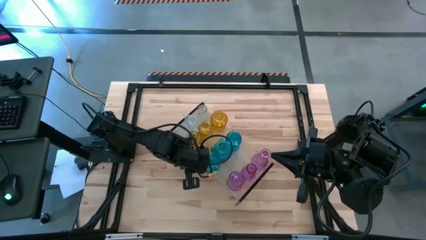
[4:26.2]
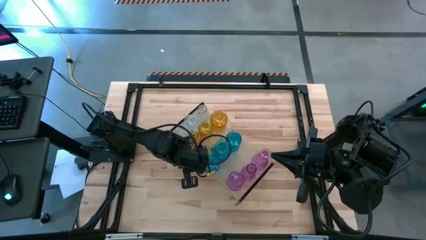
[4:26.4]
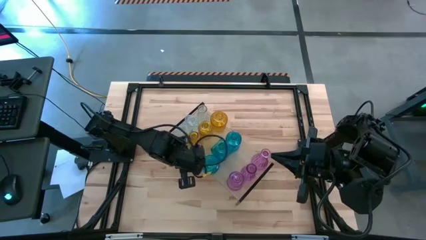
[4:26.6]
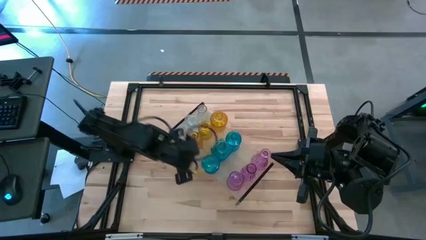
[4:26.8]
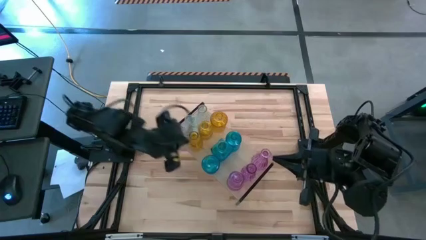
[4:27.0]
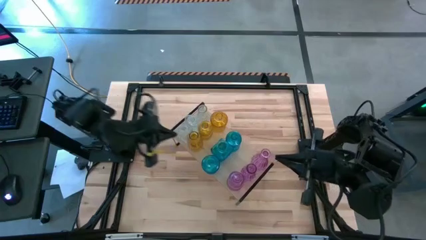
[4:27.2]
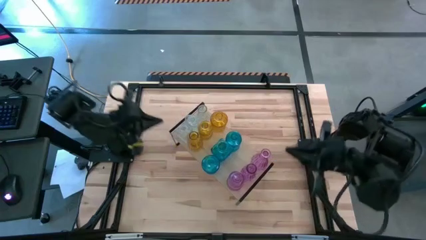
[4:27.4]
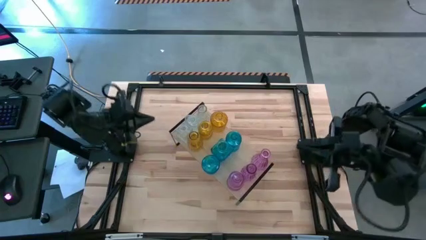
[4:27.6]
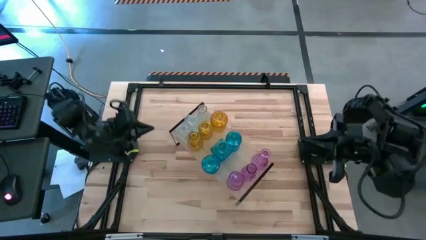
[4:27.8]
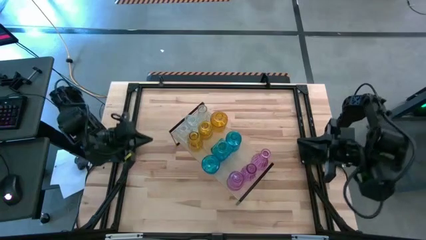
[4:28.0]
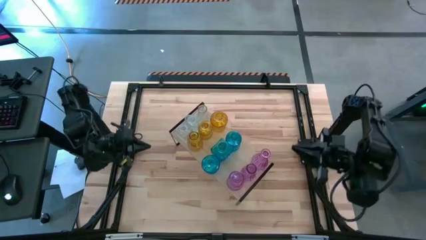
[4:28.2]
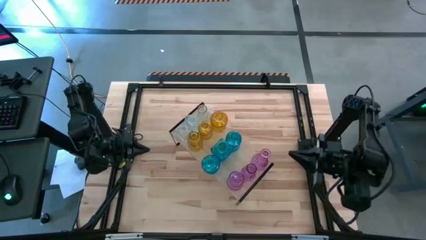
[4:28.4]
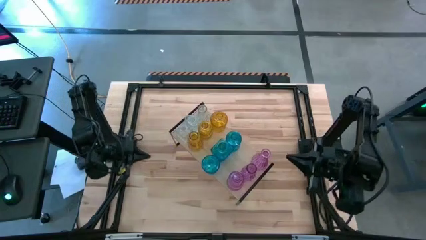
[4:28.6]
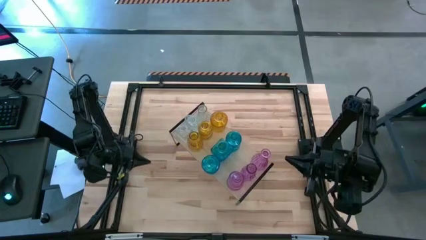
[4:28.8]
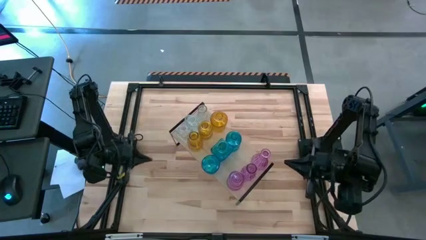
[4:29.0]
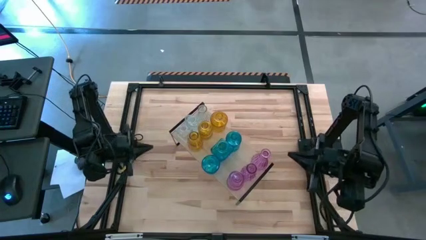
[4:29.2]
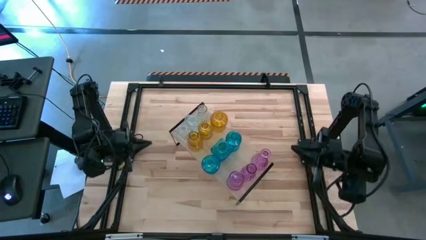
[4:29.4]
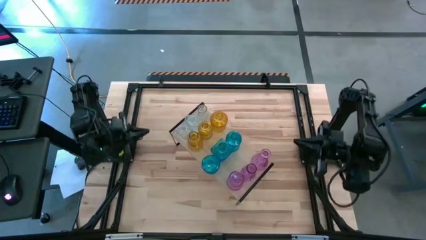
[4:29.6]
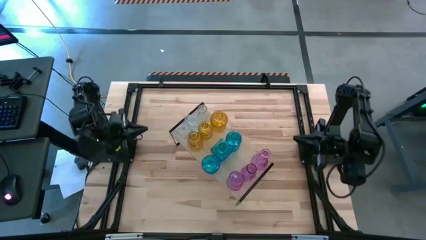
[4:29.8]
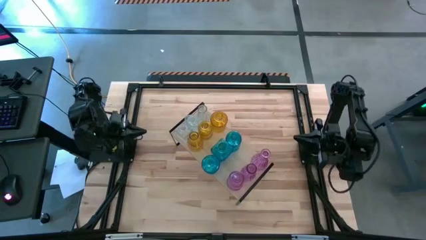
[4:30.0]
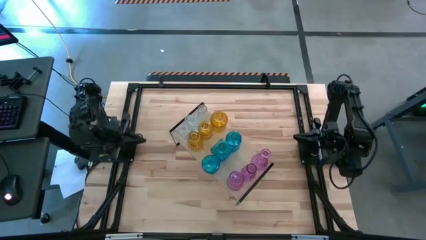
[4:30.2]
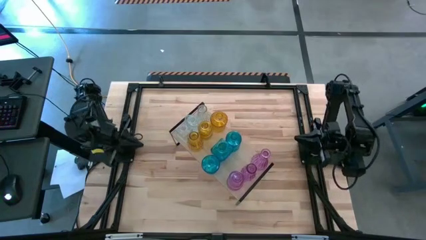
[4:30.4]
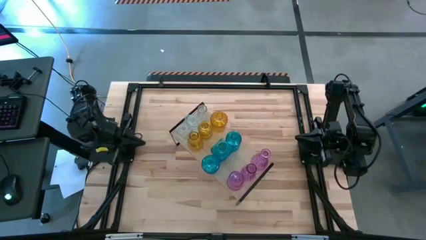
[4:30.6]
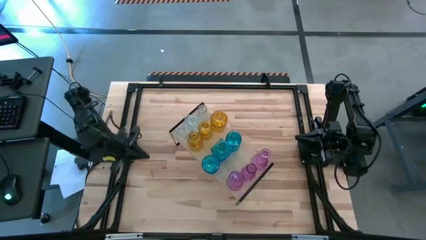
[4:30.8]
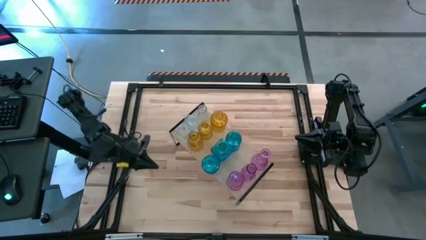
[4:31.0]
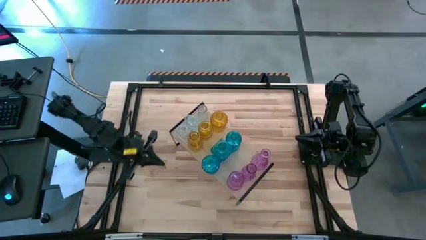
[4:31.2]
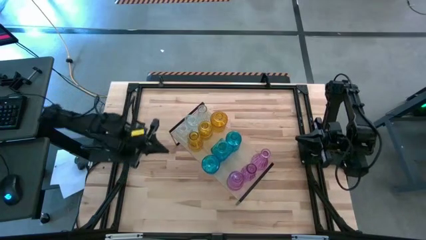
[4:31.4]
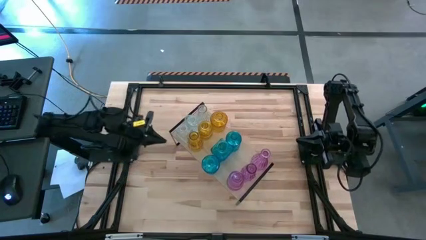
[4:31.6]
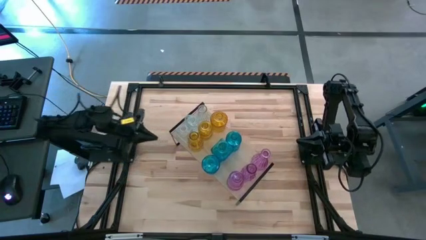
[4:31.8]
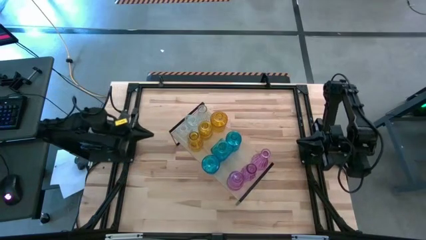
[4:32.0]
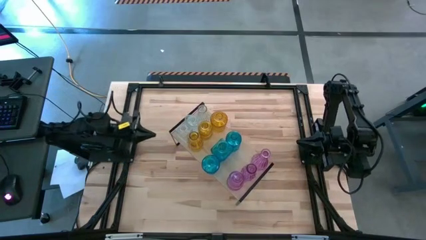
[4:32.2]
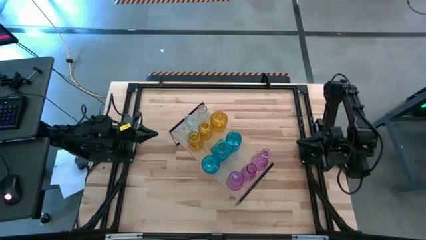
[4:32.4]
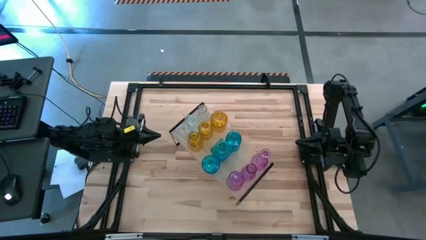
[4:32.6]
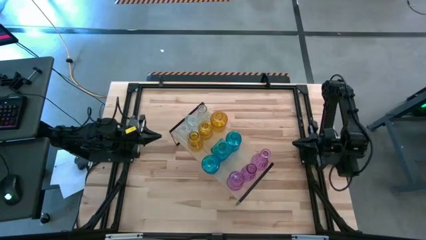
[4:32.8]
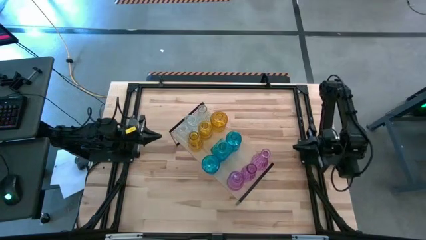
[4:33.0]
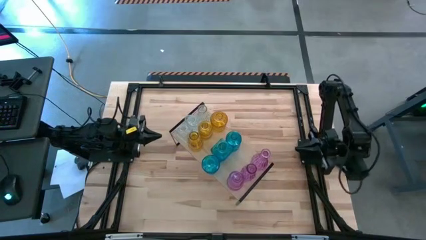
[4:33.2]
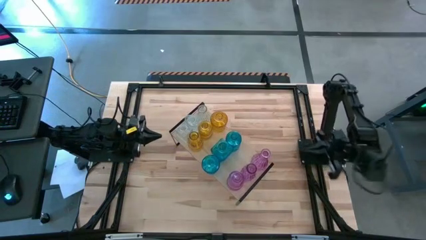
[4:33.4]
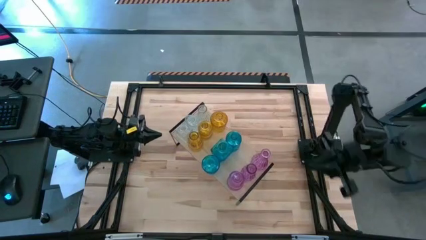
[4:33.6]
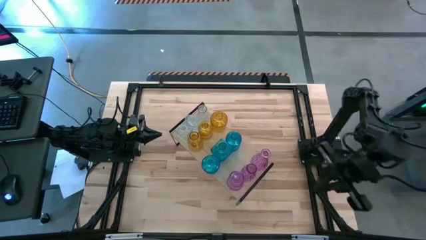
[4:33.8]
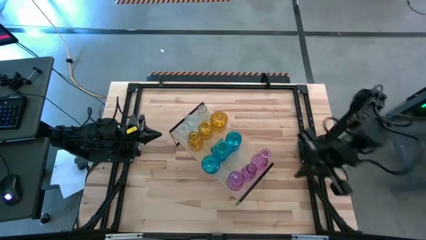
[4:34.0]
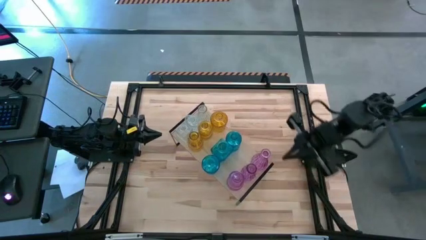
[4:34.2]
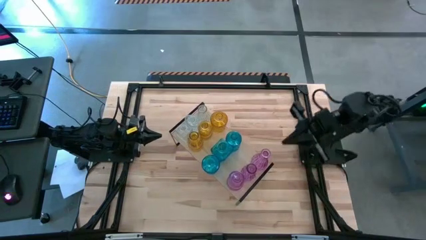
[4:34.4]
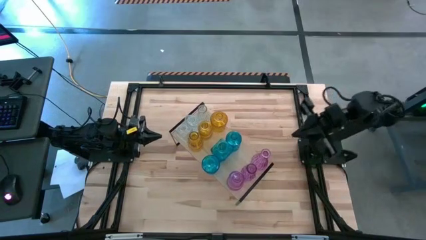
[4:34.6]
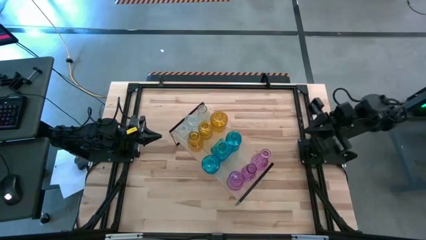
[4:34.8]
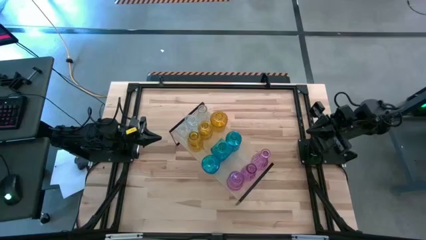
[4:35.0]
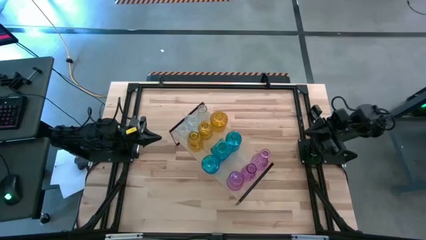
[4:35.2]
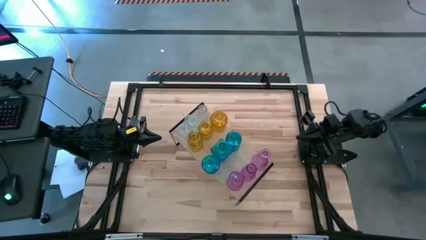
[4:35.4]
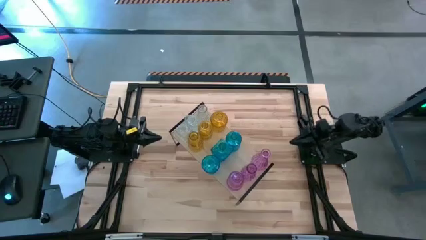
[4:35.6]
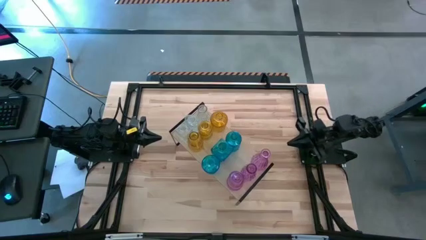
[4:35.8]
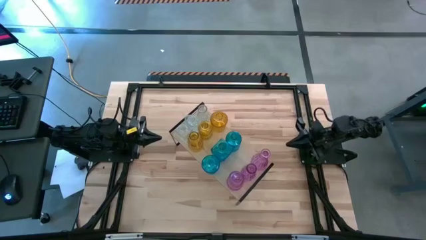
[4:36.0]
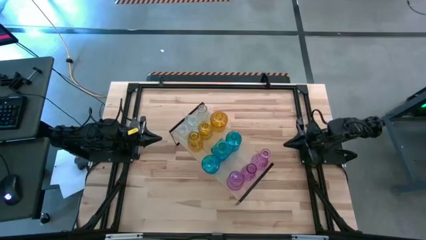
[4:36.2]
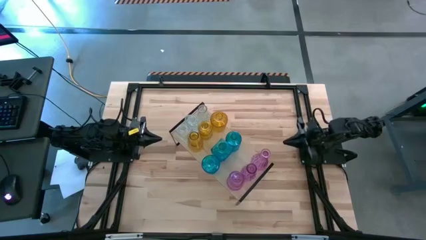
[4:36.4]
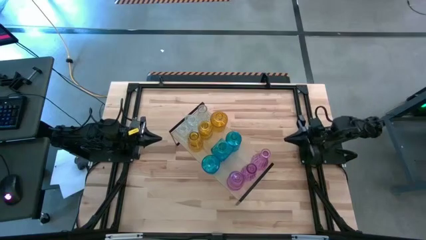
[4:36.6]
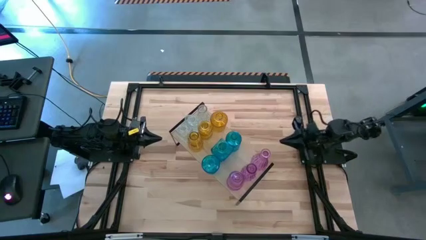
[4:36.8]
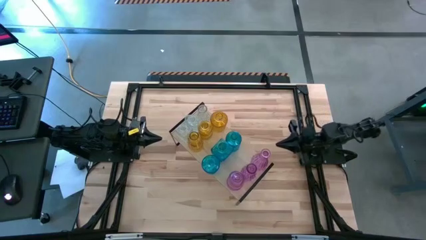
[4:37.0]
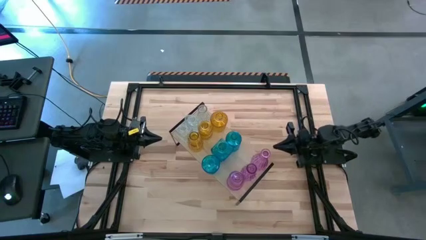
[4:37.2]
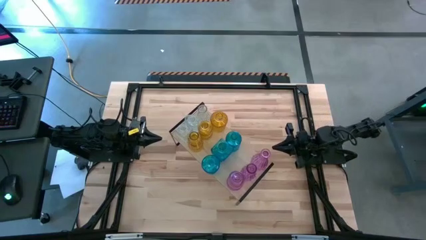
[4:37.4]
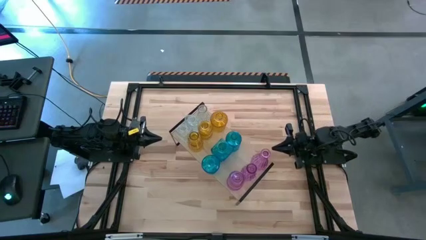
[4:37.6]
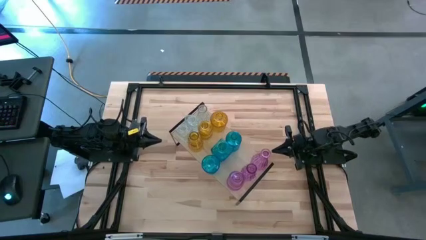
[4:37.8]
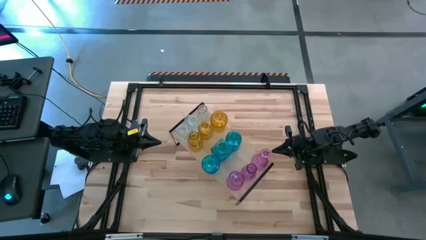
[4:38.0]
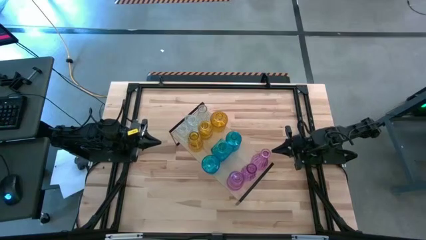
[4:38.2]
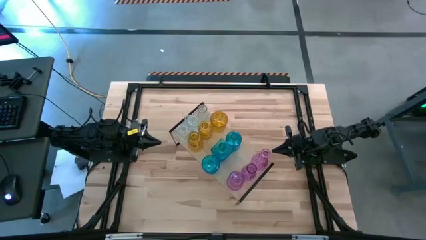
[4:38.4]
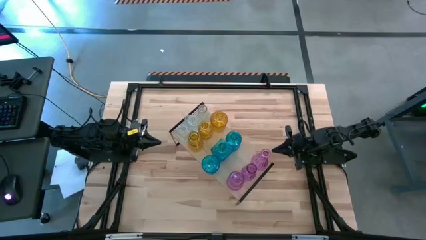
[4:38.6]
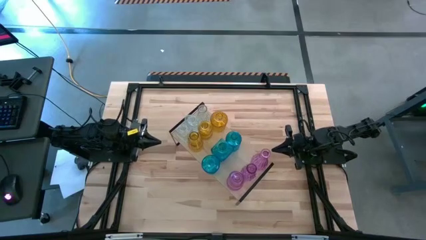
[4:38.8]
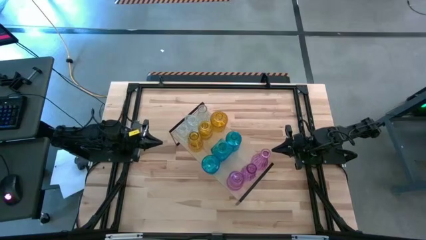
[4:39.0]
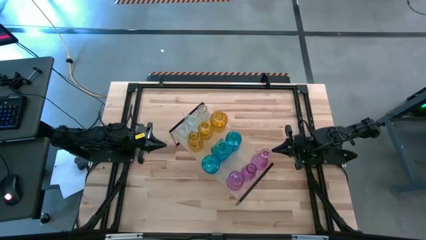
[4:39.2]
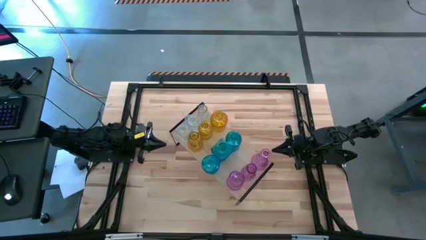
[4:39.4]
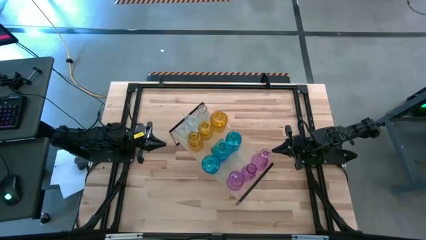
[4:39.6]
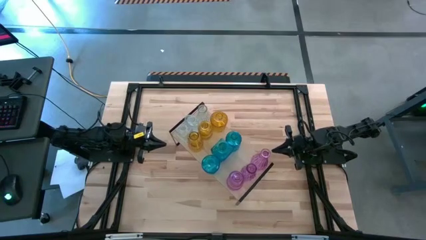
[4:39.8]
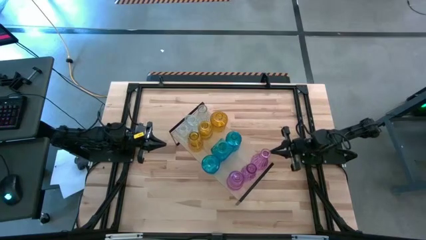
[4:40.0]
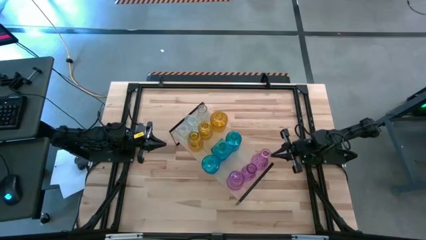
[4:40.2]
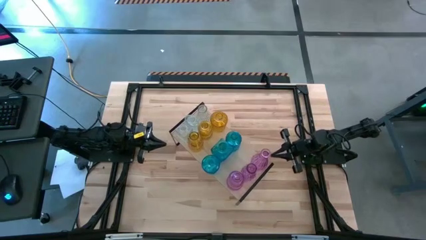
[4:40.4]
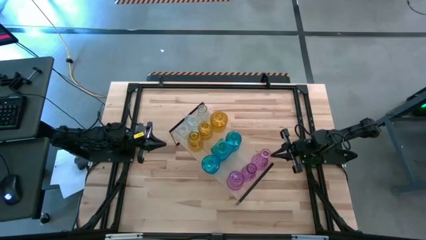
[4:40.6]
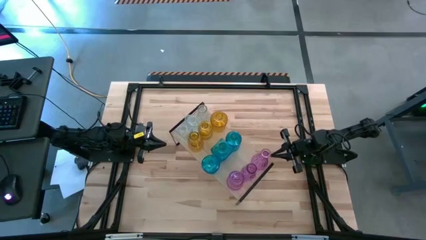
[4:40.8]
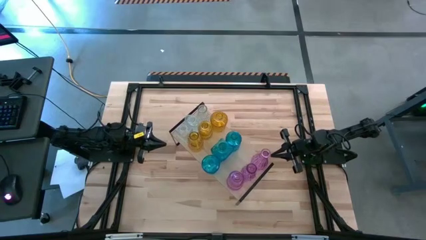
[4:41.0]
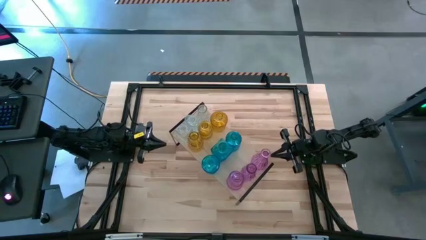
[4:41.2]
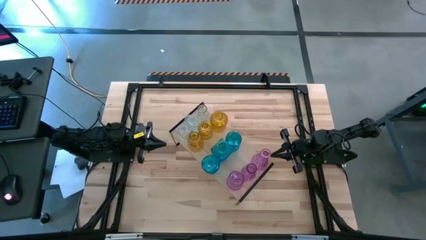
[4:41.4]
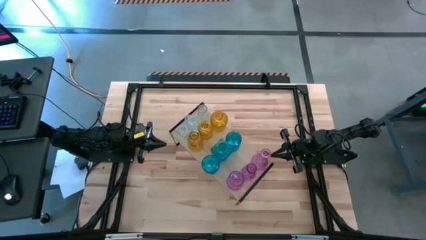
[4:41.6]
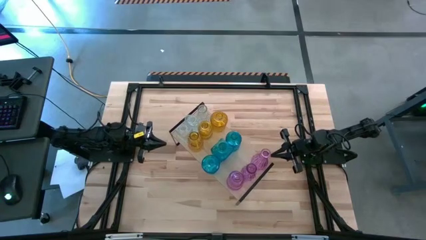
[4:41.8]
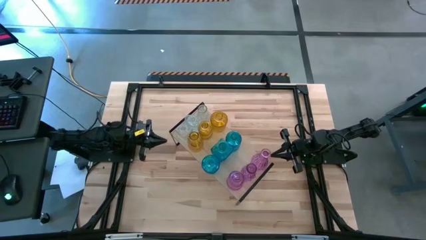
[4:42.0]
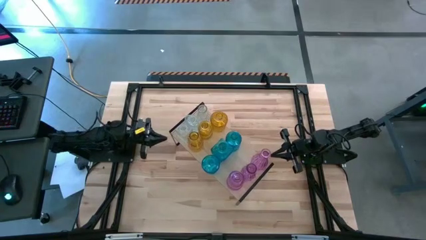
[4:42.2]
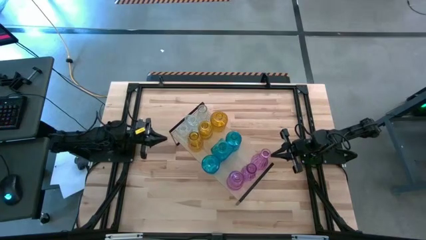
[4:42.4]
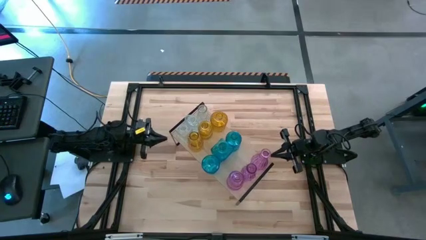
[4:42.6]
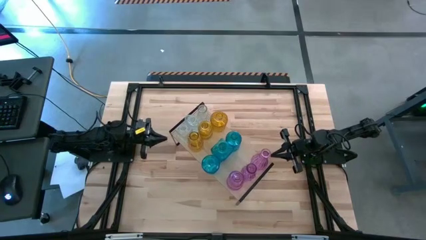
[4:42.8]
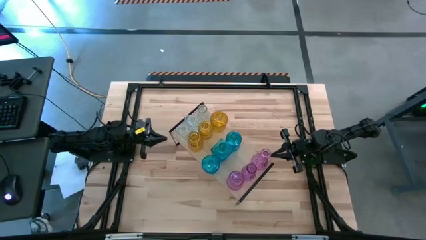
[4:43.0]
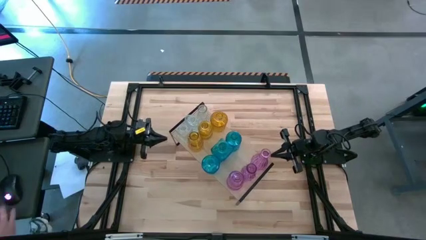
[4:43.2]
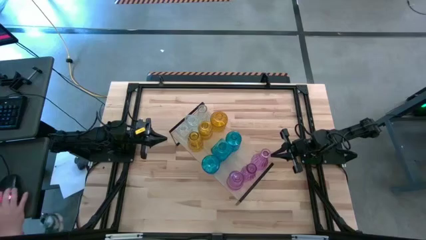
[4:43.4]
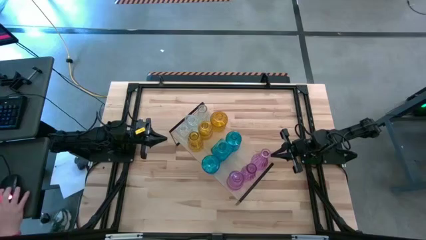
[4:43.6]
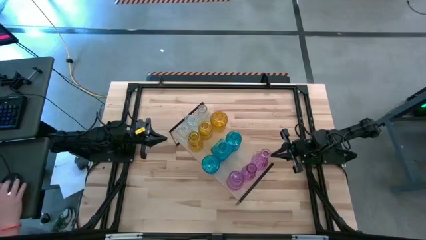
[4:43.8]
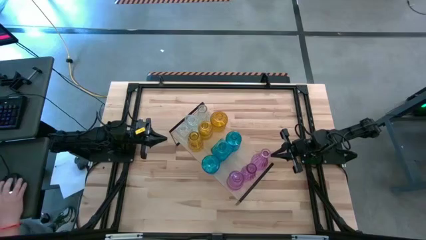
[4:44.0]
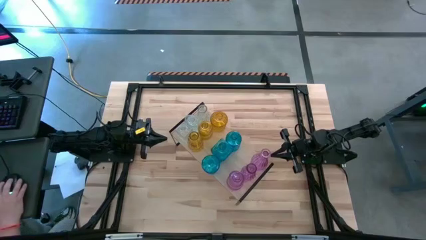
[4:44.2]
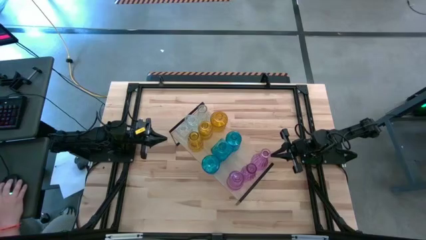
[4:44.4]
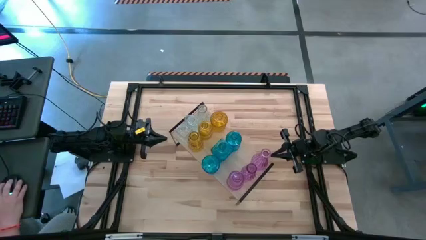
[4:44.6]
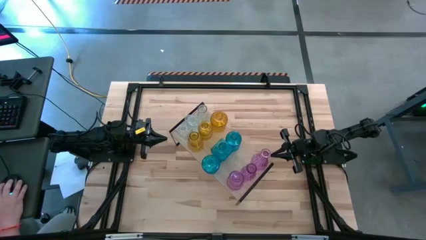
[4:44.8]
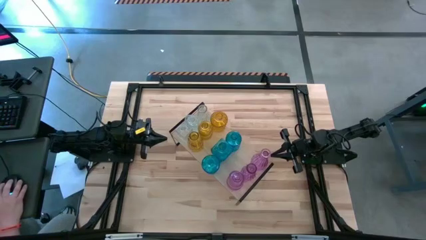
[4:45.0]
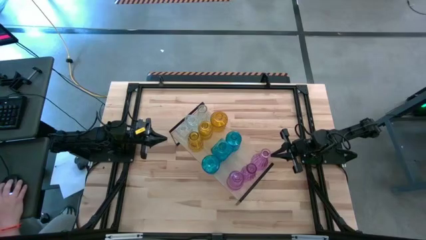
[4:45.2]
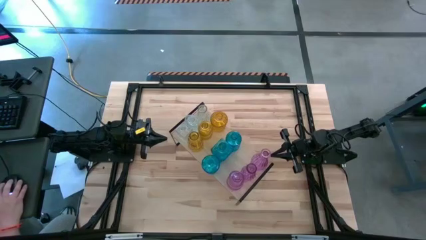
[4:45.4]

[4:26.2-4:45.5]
Task: sort vases onto shelf
Return to Home Position
